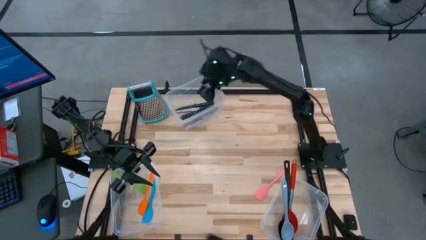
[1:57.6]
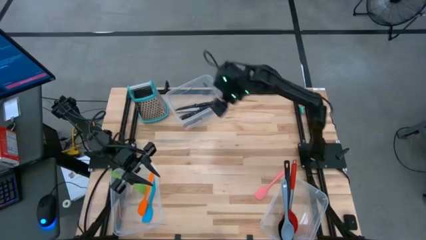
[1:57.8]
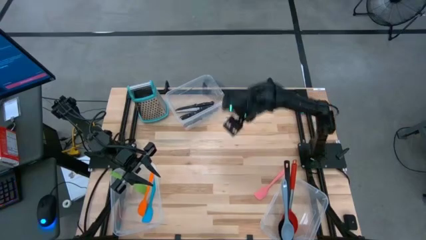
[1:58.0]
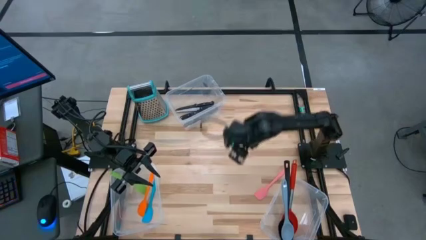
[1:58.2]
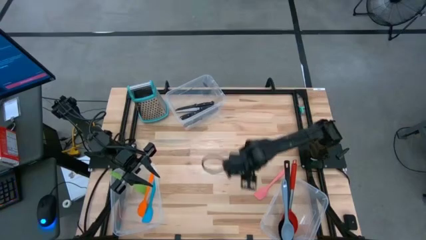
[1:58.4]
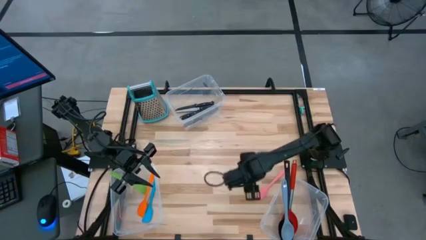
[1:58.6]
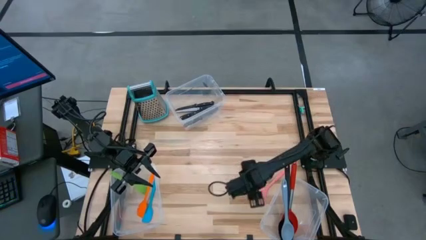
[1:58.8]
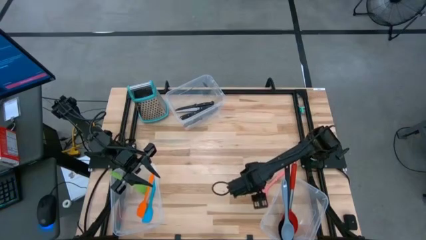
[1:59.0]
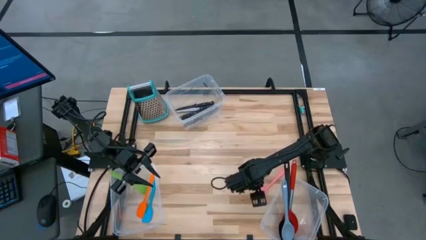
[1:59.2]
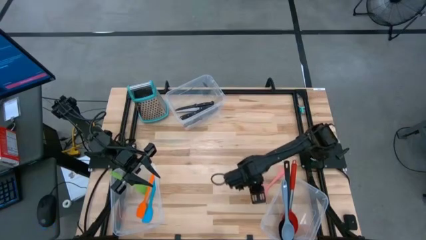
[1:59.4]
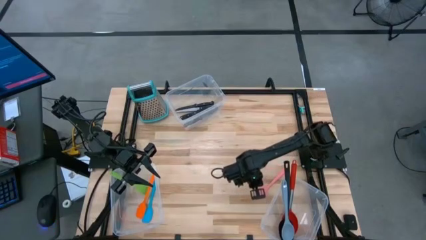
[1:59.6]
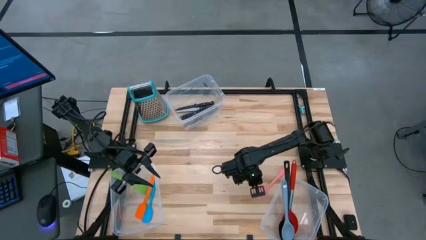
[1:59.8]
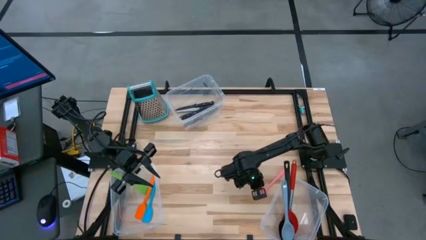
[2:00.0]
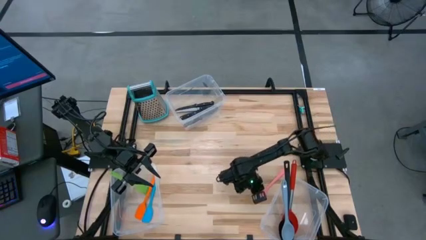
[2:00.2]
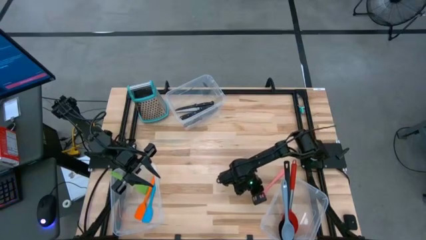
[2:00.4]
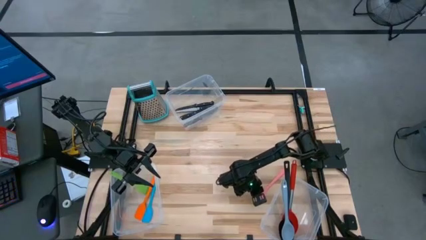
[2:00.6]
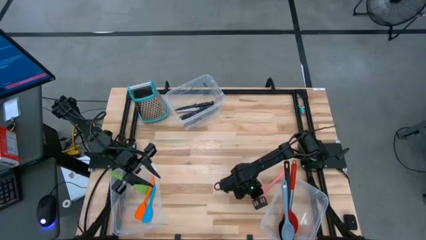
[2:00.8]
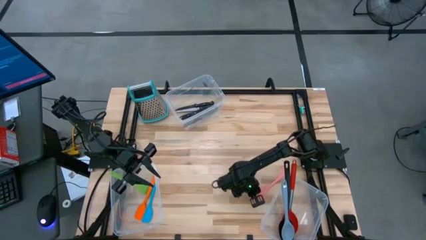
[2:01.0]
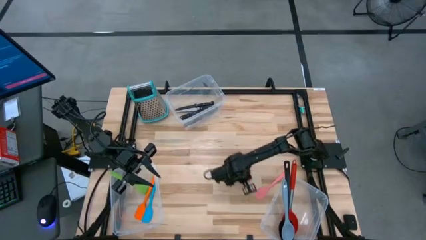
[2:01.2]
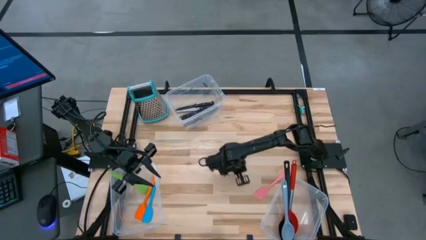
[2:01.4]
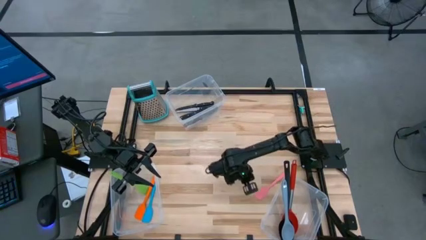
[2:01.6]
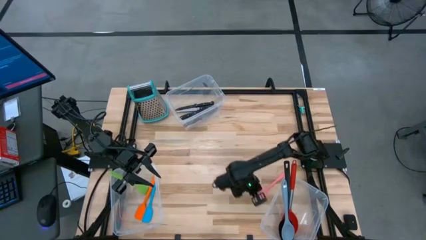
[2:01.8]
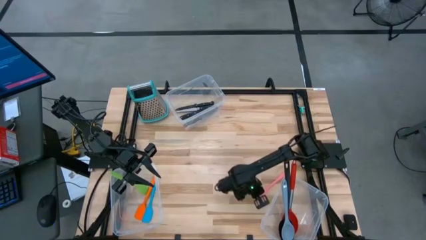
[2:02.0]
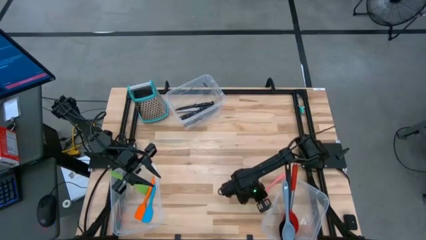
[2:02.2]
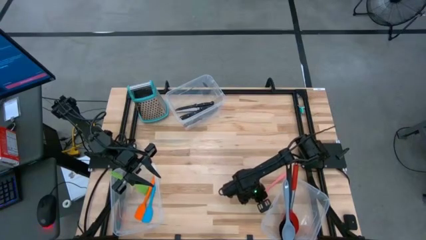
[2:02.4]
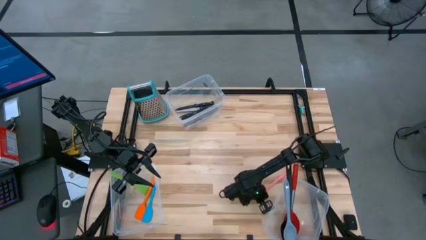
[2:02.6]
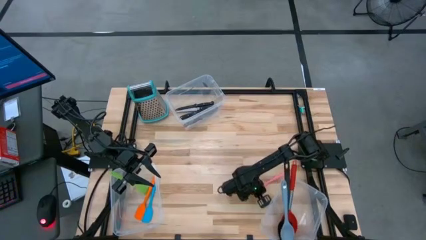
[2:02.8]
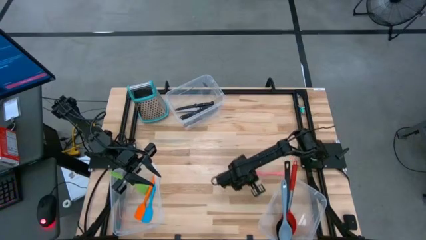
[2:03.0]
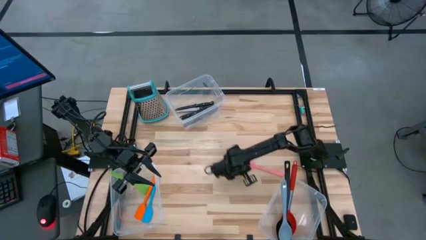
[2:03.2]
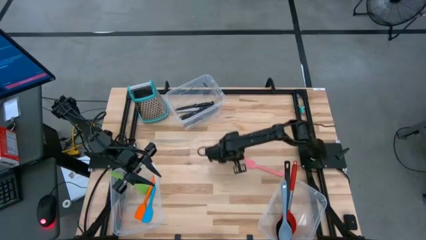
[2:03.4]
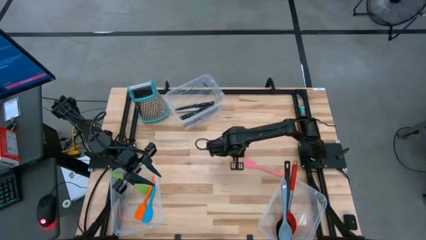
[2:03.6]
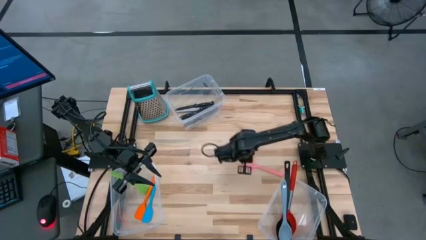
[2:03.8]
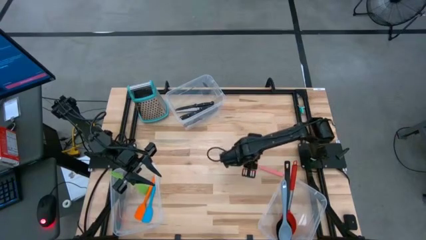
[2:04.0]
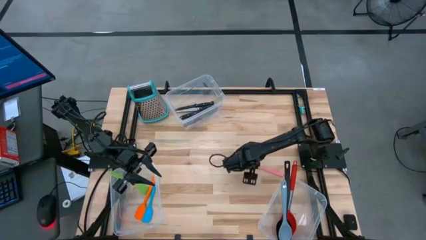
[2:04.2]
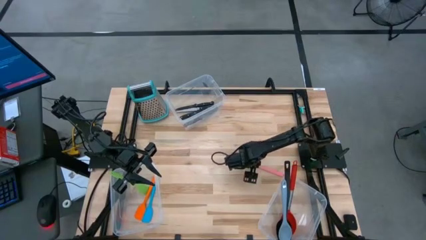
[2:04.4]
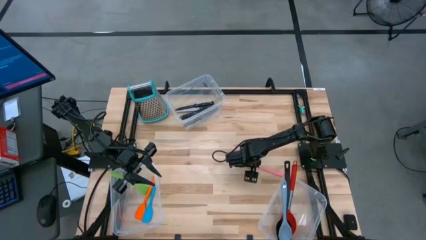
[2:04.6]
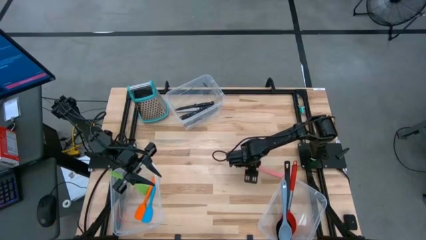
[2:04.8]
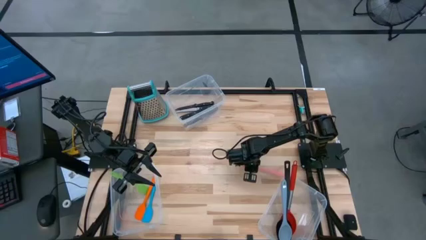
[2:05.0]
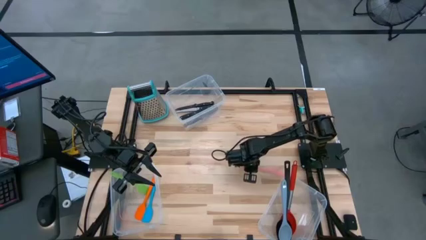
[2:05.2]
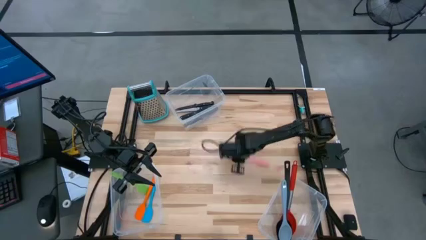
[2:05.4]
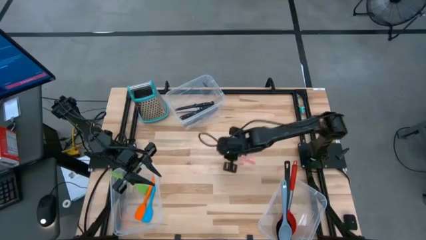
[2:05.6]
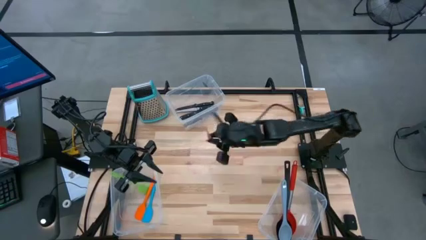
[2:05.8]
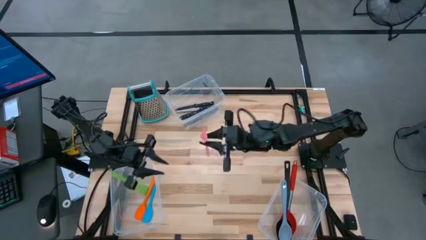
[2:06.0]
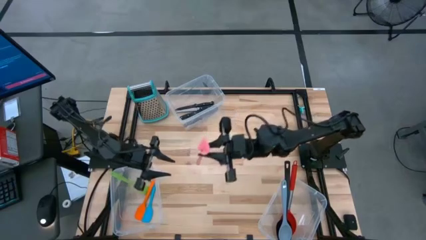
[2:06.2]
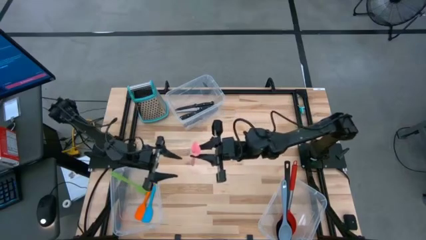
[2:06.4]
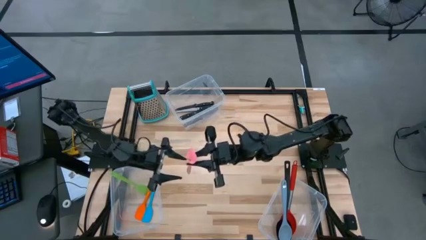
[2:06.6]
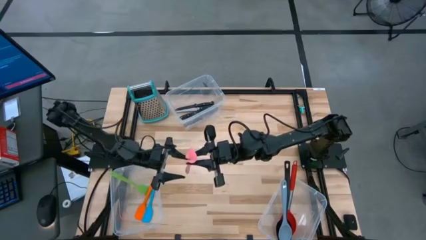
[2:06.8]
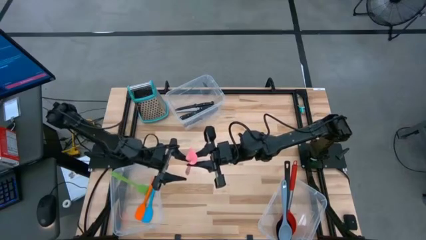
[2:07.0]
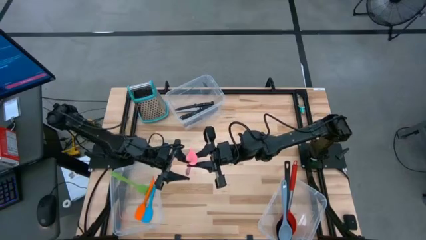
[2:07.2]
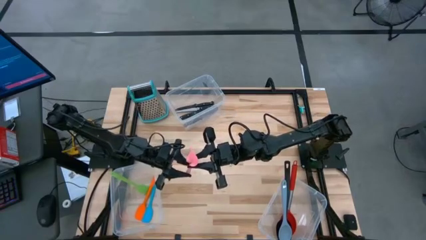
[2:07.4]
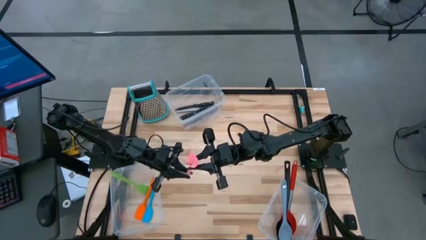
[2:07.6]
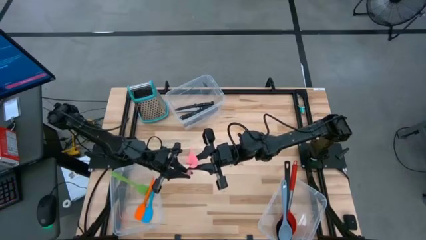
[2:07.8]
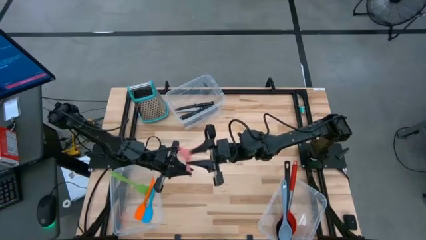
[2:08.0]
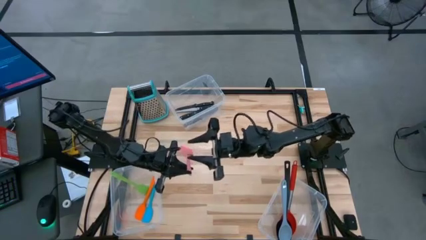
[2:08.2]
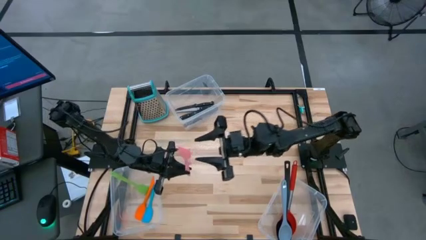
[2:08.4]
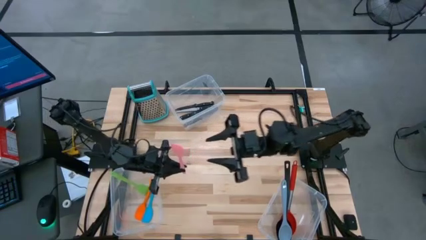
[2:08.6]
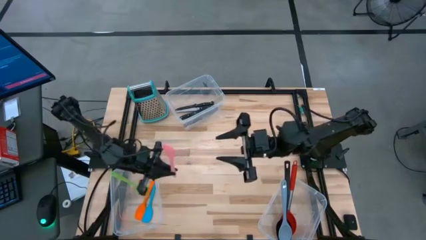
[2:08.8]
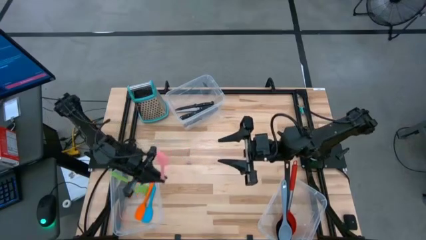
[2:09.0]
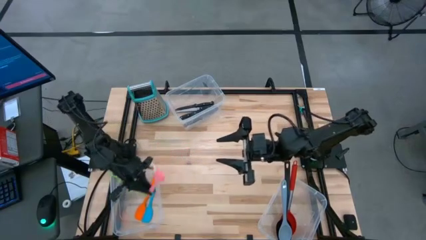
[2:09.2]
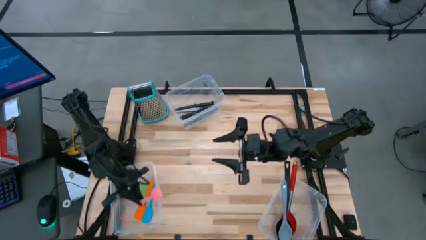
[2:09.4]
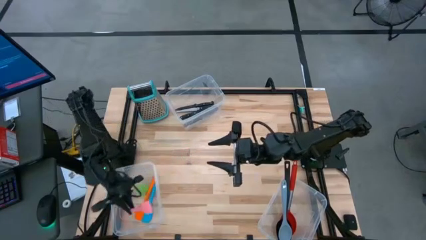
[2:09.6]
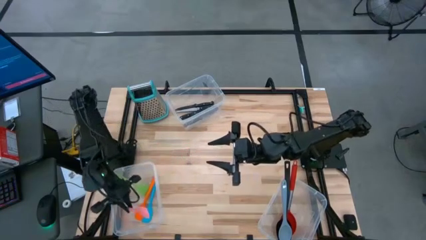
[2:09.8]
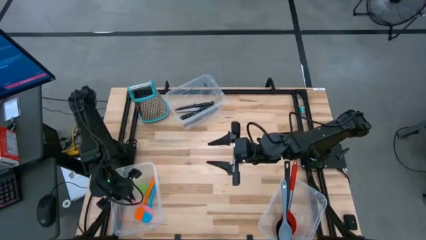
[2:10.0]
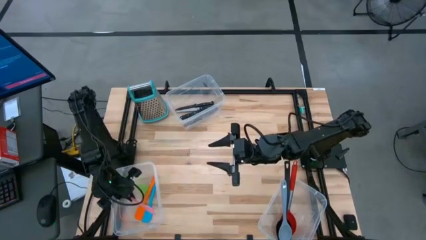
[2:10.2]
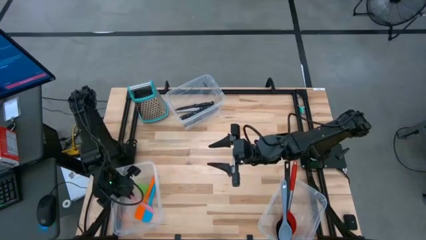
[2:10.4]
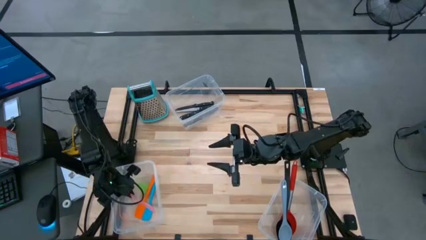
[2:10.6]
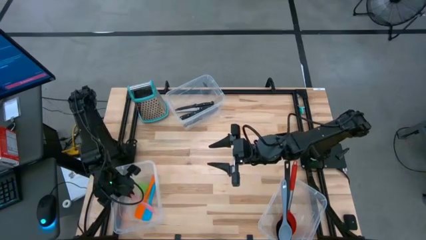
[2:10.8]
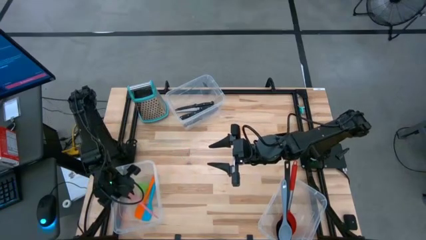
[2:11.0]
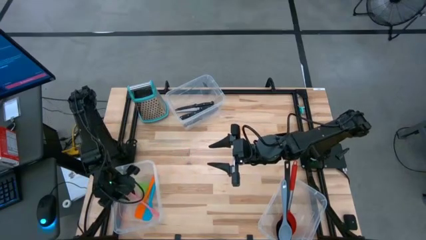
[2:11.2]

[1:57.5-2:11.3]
Task: Pick & Place Kitchen Items
Put the pink spatula into the bottom left transparent bin

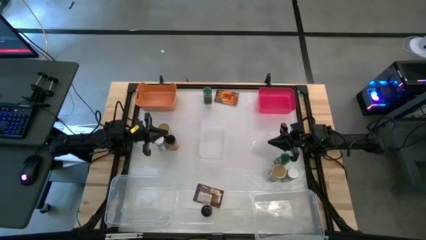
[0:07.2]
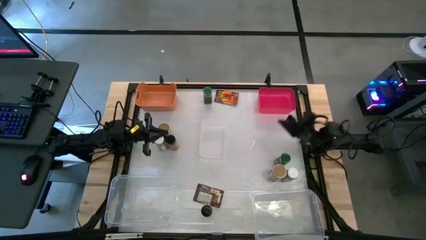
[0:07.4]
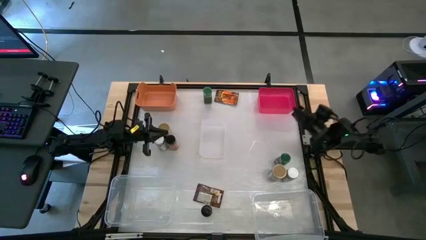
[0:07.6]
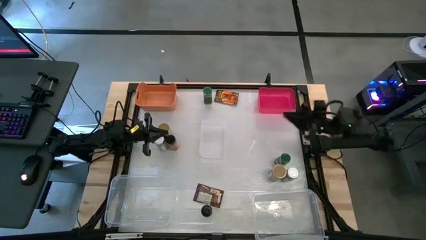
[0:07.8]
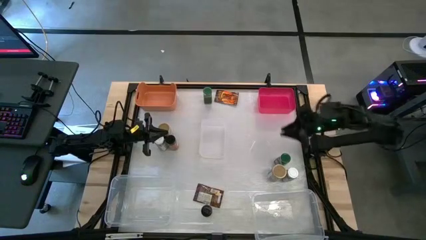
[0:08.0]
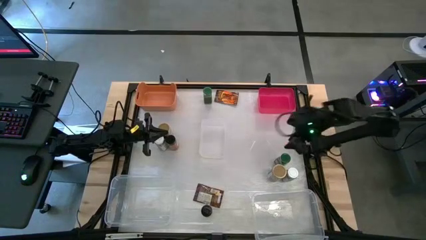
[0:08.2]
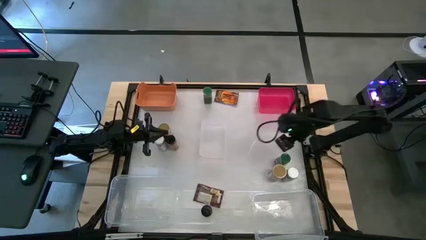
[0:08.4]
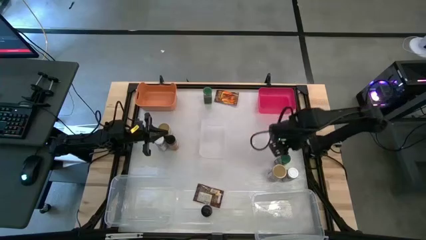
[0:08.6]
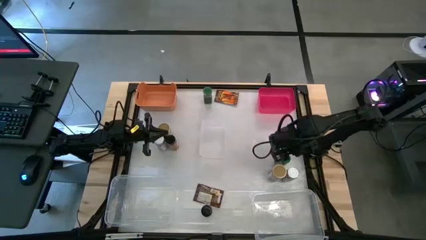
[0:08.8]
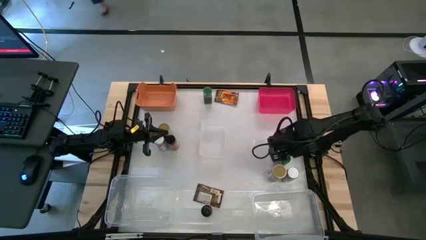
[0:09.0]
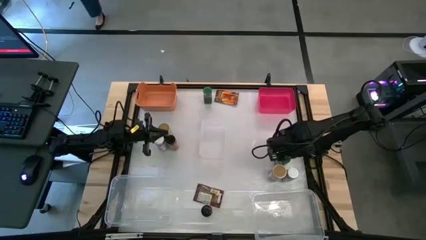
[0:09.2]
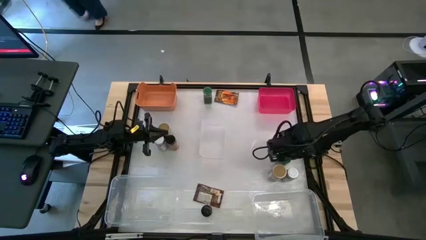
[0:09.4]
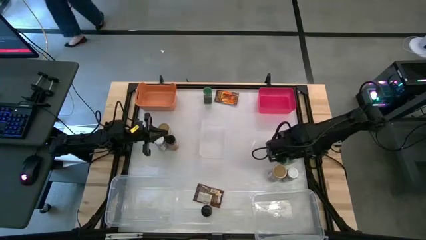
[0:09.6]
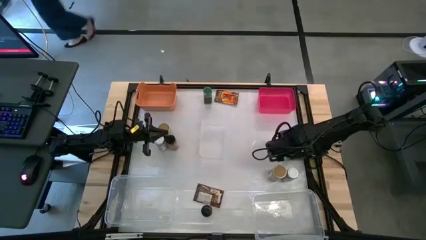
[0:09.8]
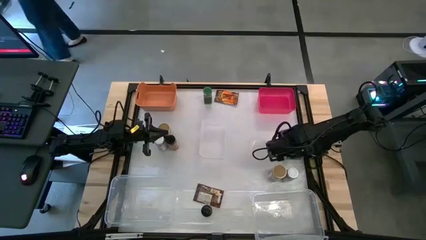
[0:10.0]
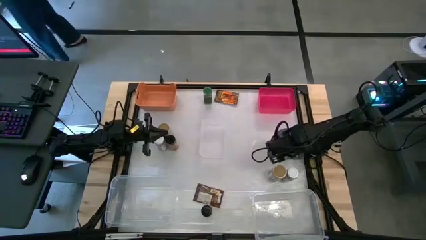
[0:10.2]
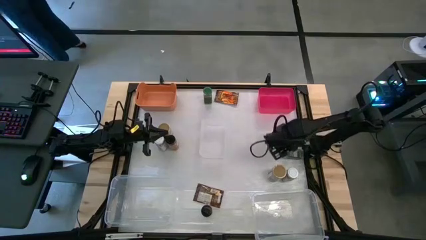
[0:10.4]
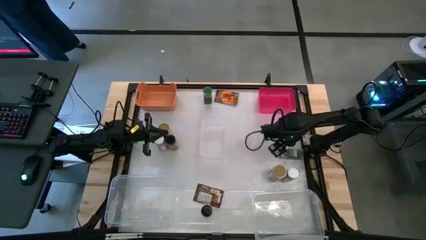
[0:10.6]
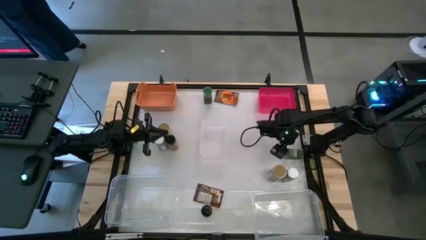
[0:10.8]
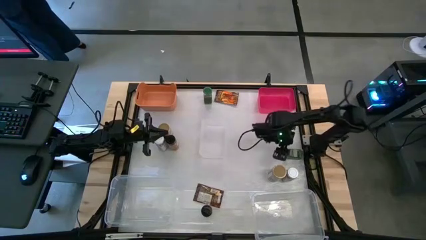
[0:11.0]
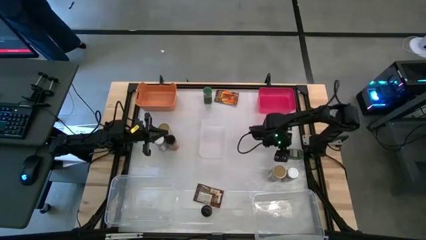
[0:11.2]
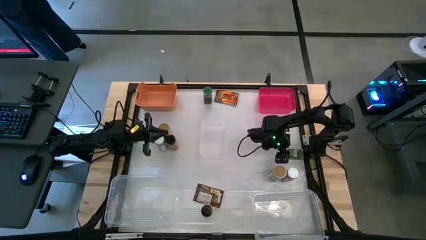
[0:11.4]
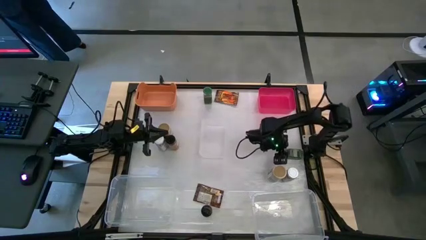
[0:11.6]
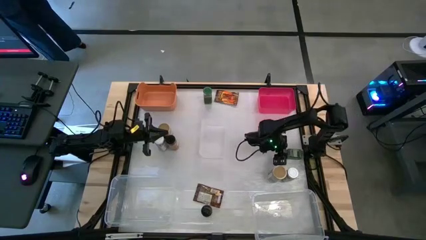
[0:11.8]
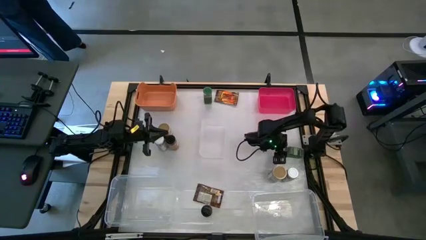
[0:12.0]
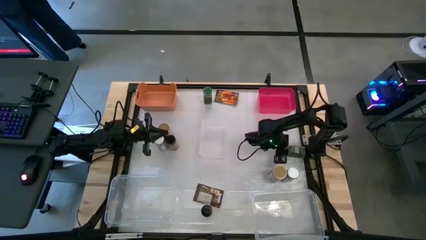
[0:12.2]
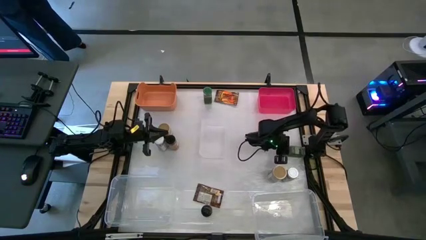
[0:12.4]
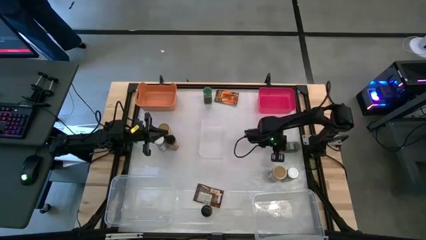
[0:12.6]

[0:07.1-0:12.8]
Task: Sort spices by type
Put the bottom green seasoning bottle into the red bin
